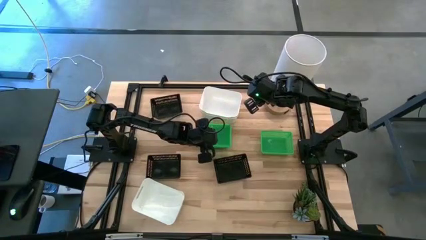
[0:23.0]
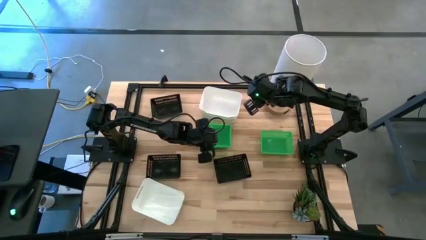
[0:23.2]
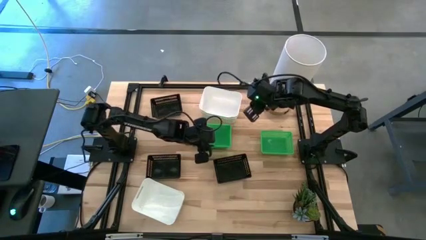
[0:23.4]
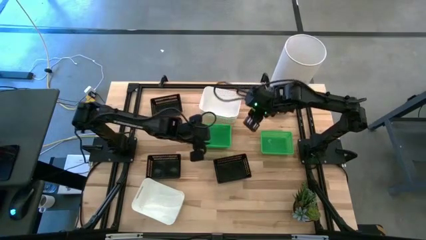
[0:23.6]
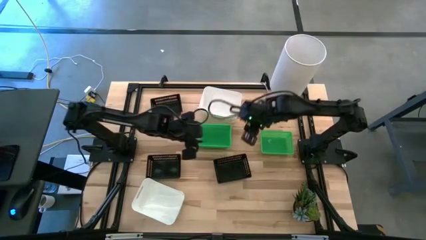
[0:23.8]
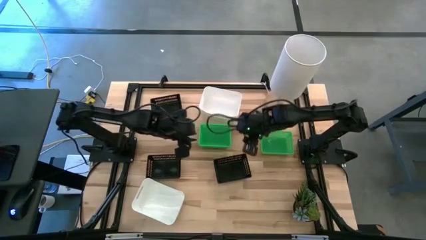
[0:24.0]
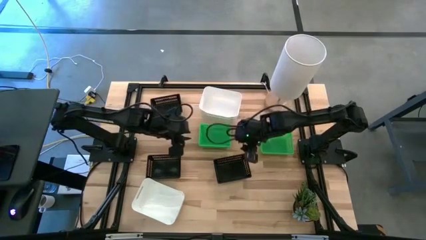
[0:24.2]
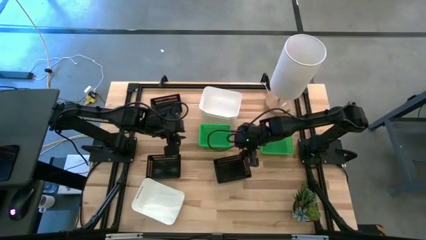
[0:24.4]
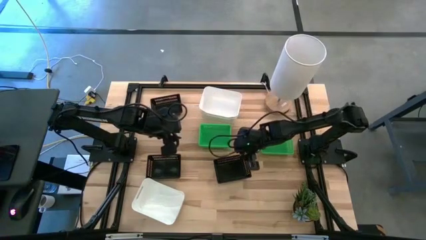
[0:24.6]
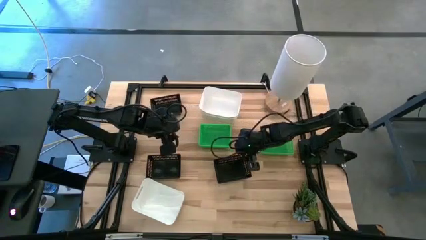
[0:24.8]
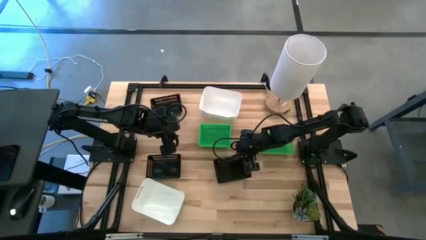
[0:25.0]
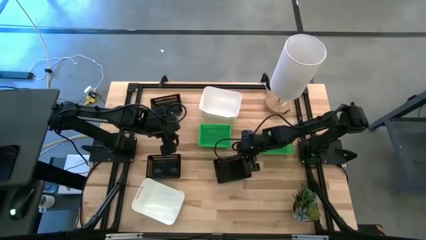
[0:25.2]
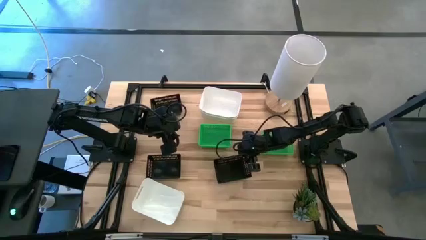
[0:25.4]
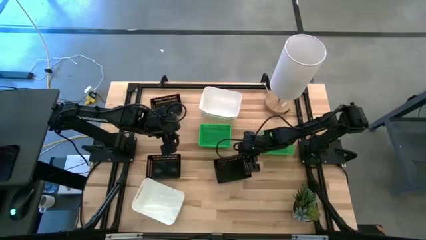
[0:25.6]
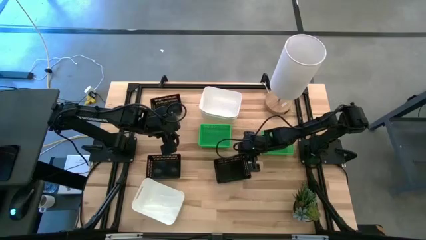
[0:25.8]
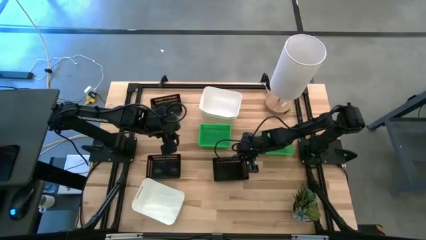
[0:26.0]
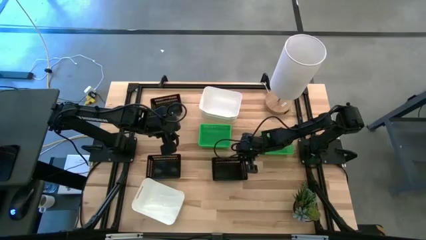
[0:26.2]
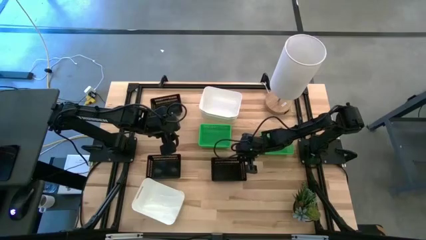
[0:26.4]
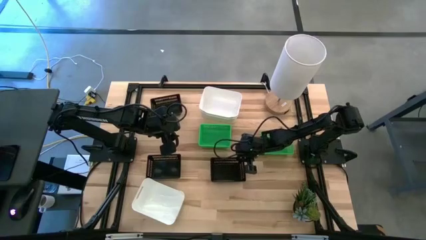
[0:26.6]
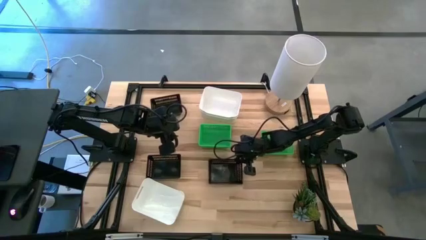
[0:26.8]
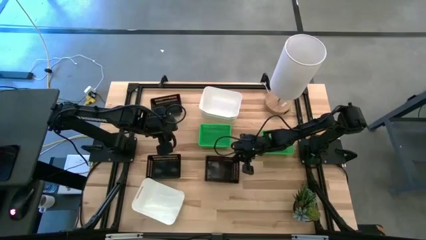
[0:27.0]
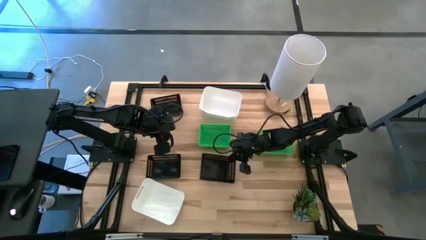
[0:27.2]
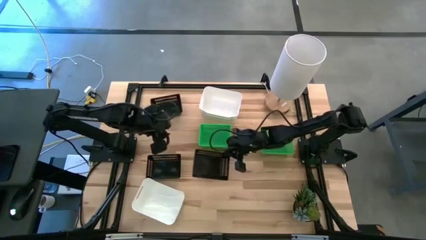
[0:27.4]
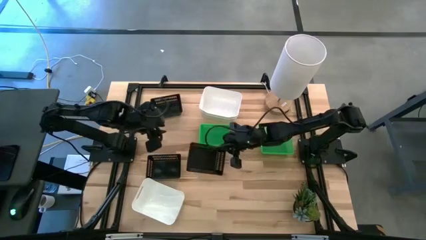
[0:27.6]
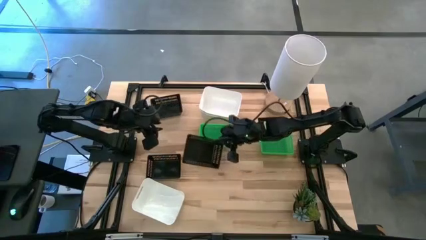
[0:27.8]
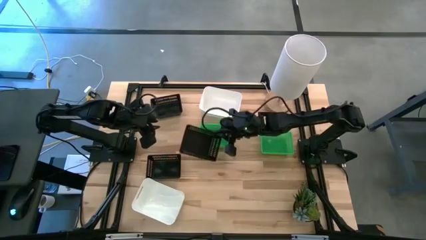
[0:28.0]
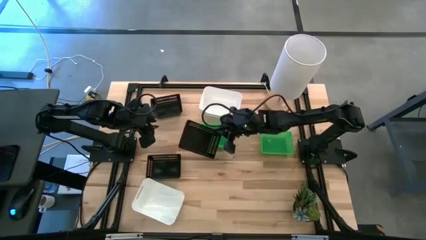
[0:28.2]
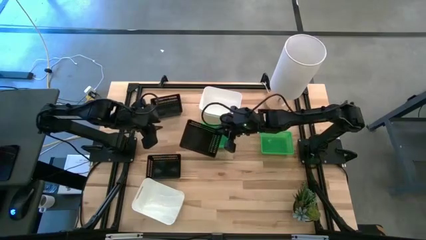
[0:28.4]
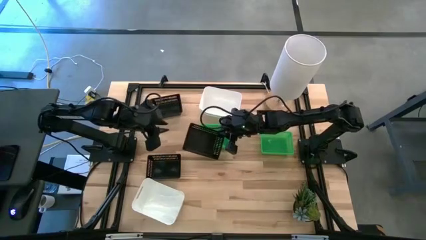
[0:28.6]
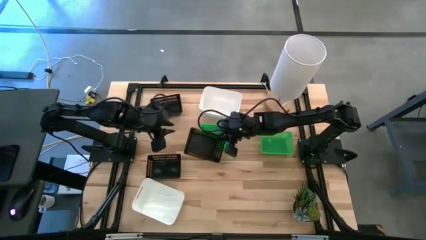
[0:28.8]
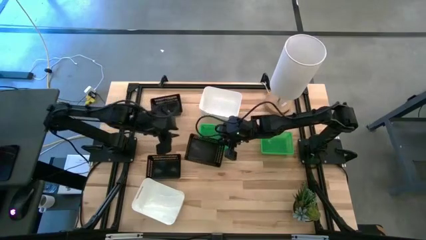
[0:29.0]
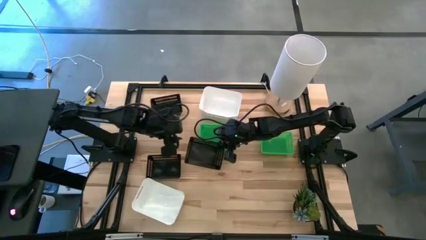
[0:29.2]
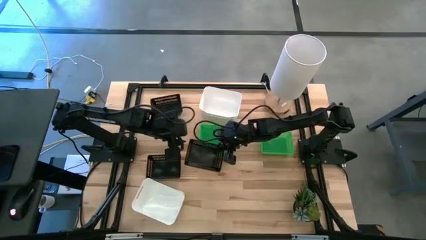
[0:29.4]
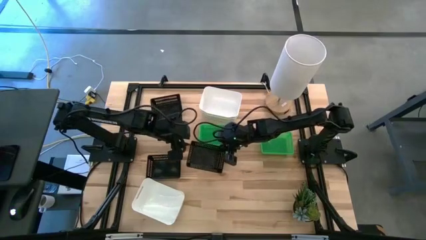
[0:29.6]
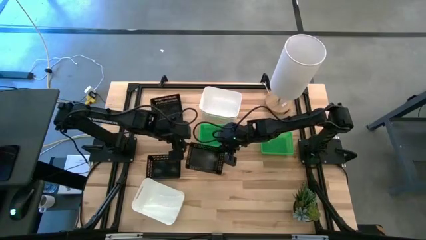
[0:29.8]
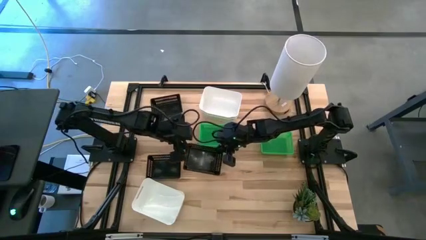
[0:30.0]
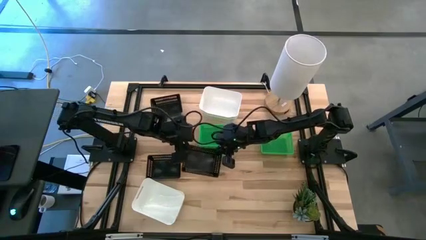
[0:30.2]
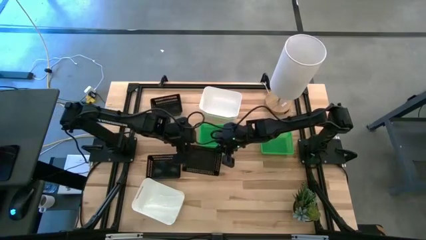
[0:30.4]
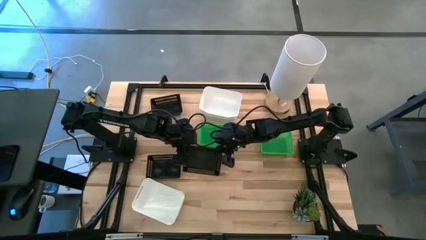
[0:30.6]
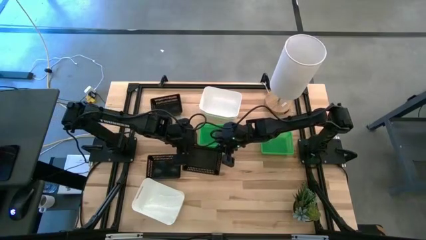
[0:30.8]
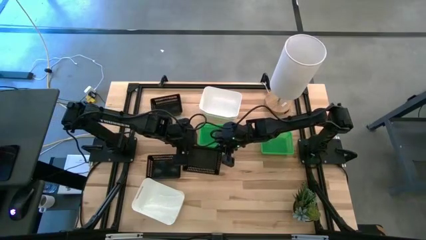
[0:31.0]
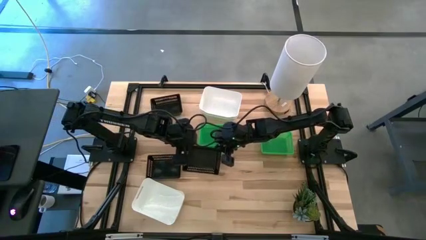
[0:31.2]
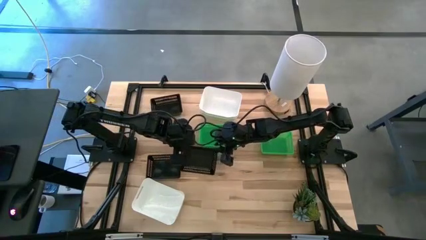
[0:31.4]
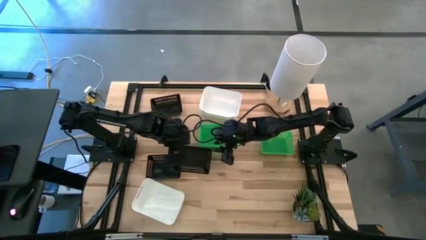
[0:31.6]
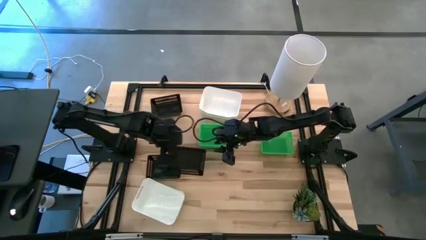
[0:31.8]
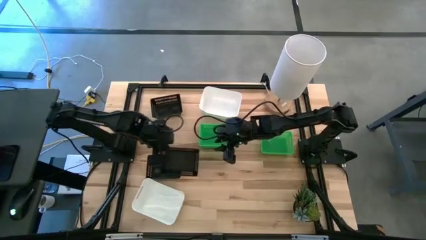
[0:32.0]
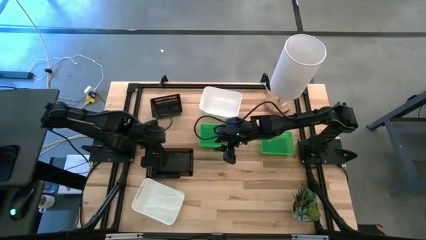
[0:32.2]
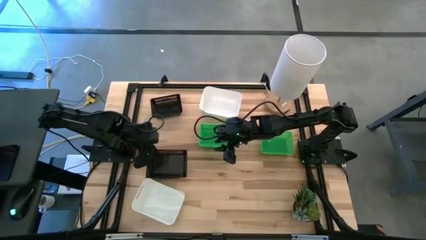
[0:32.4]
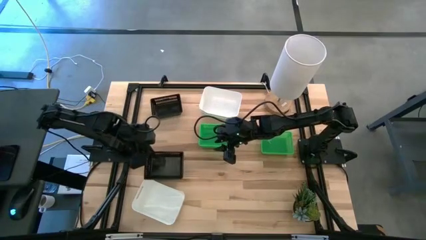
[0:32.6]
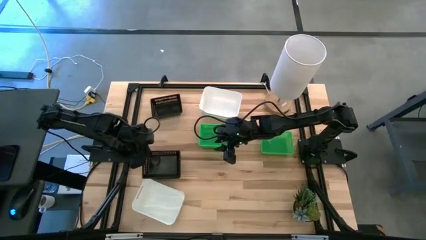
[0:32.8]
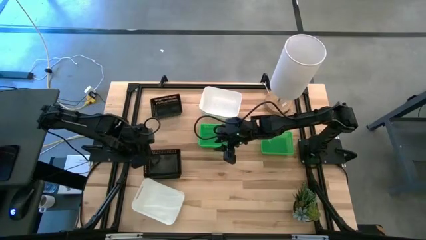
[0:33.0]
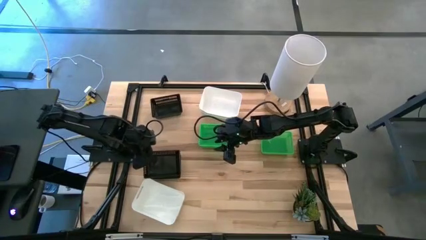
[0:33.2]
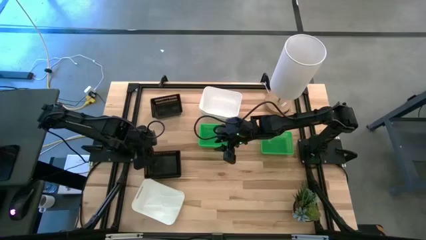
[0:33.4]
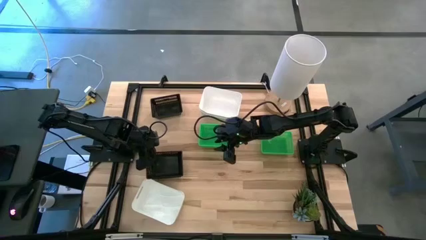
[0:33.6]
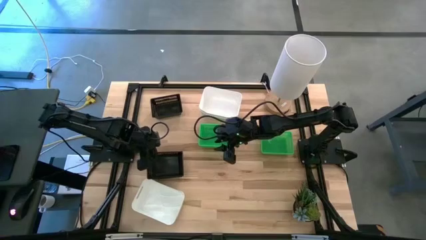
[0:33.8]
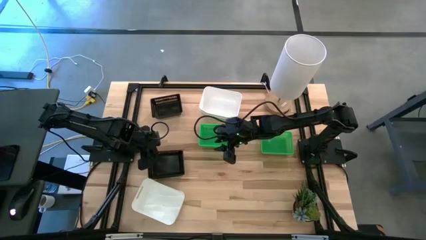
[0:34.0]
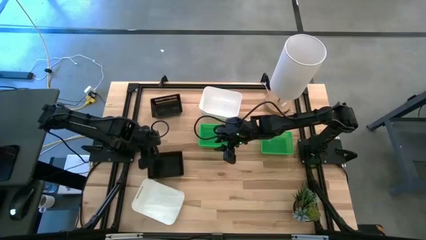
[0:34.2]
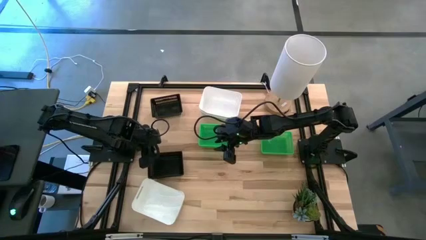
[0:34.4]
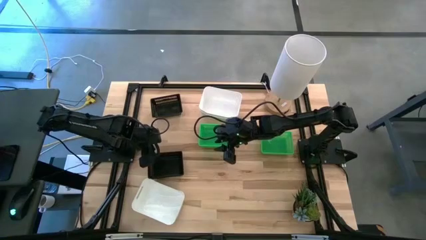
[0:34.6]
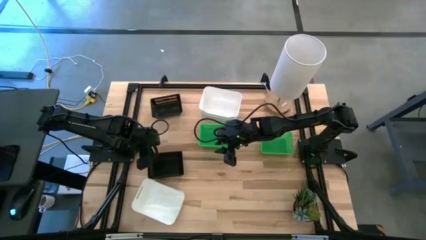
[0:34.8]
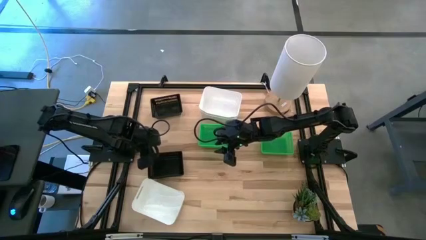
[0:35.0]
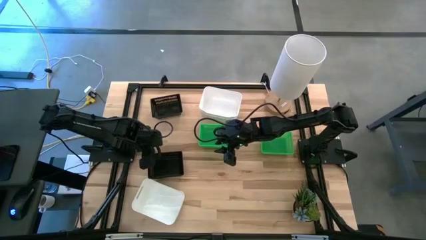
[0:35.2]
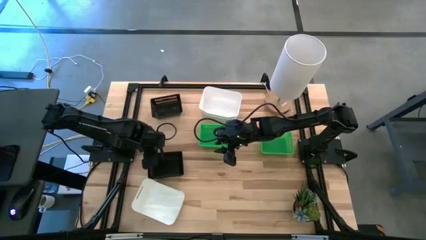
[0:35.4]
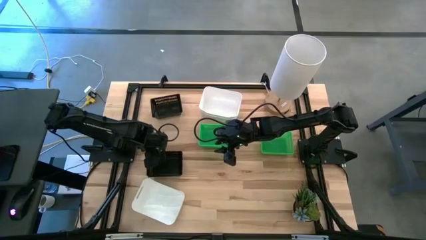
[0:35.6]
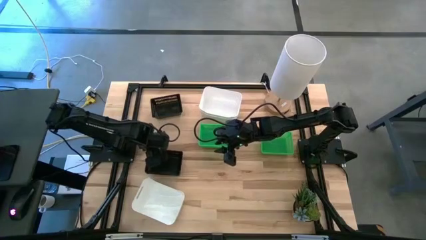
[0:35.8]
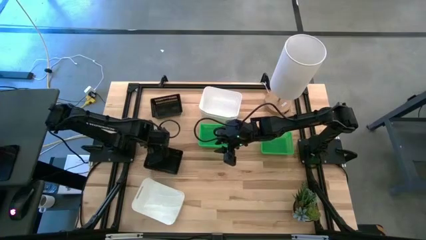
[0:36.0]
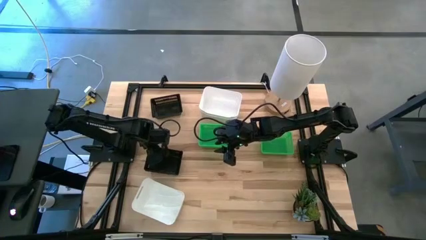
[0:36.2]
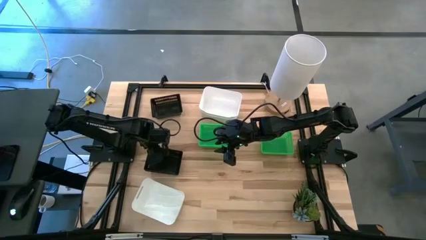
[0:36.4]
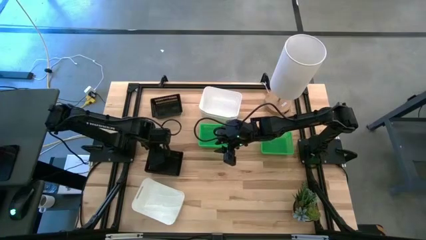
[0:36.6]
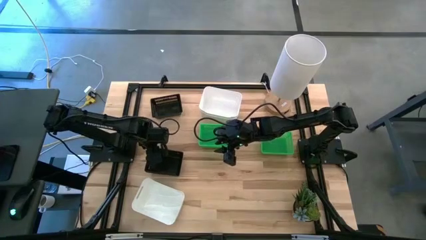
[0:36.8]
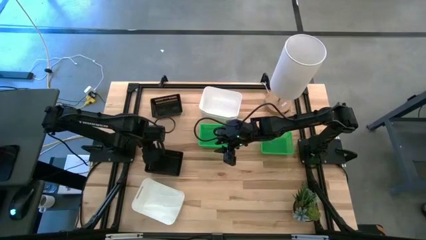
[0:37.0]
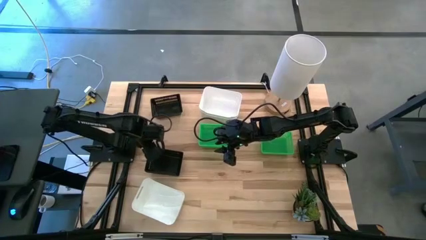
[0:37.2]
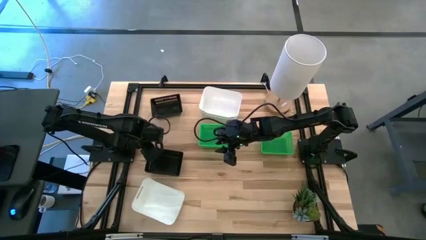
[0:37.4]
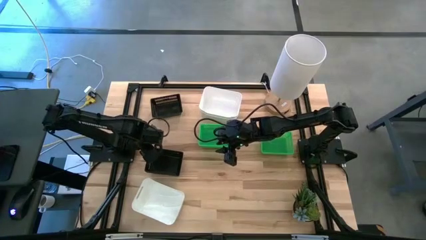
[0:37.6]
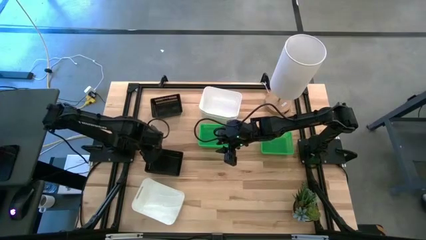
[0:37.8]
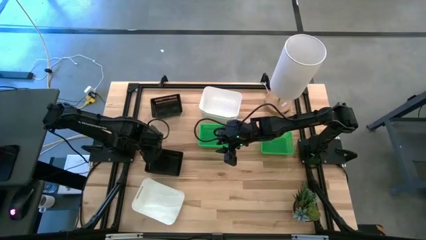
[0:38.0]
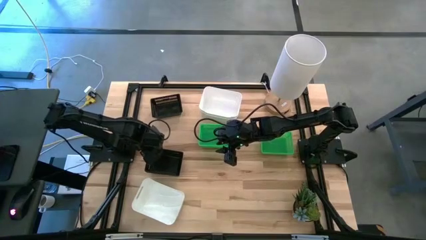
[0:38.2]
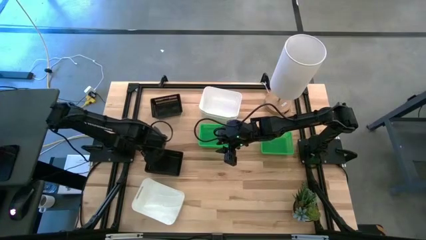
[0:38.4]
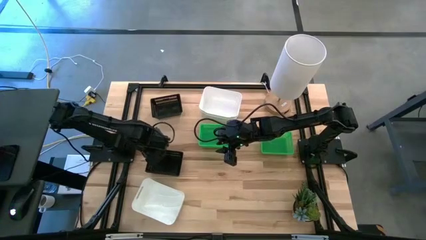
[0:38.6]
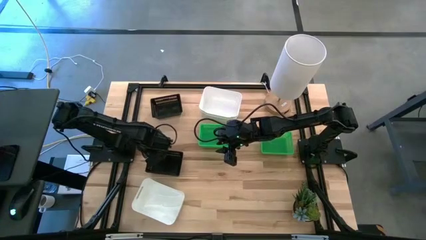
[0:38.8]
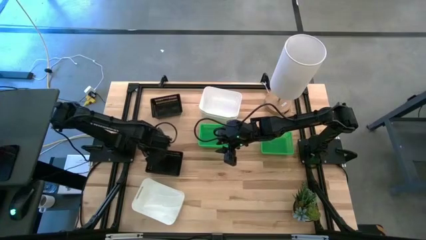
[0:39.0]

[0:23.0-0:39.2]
Stack the right black bin on the left black bin
